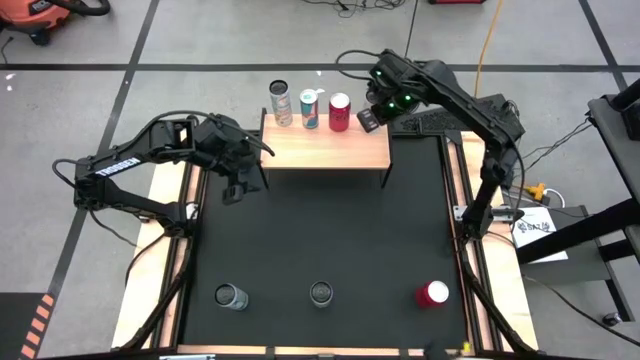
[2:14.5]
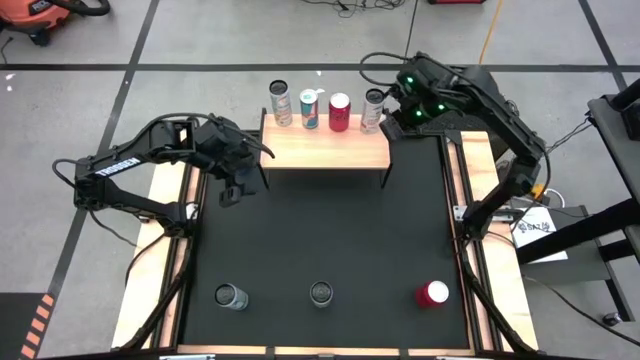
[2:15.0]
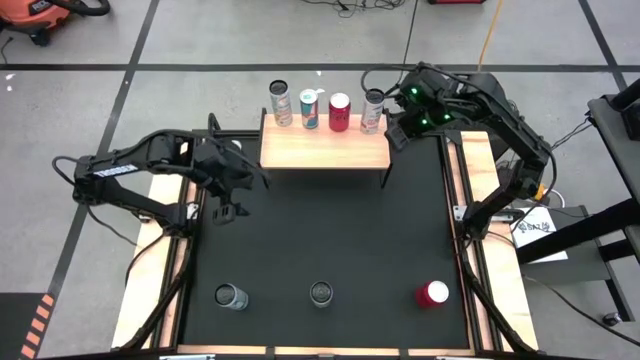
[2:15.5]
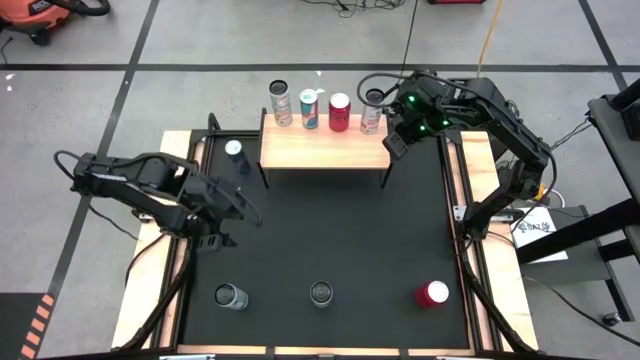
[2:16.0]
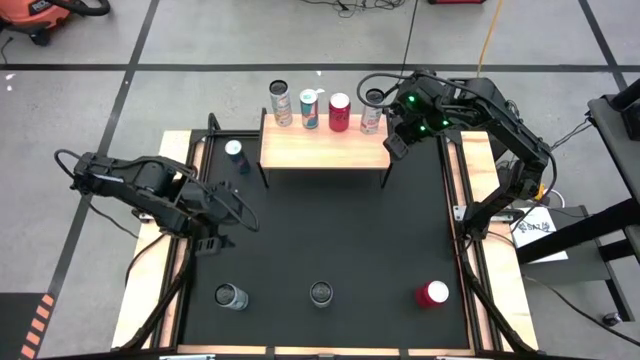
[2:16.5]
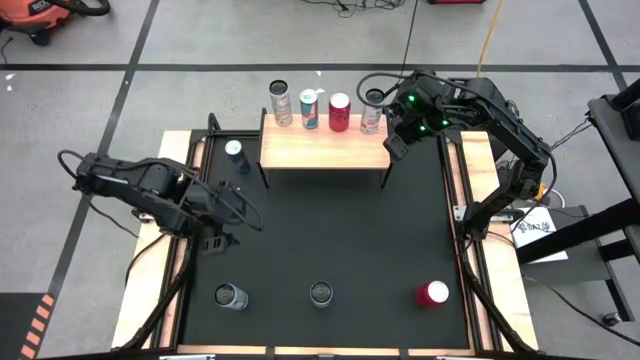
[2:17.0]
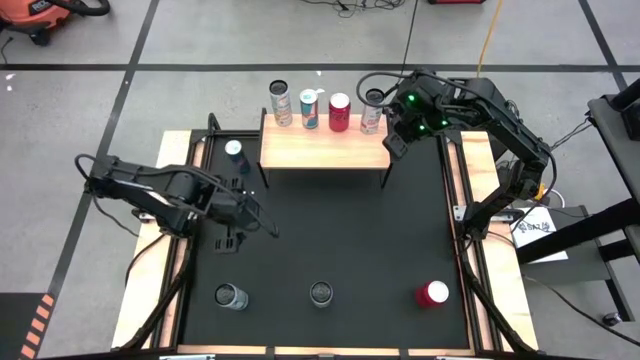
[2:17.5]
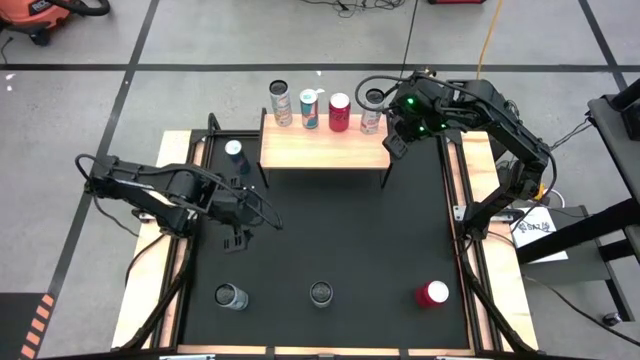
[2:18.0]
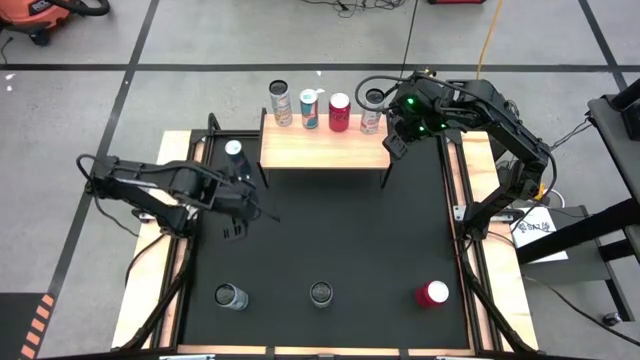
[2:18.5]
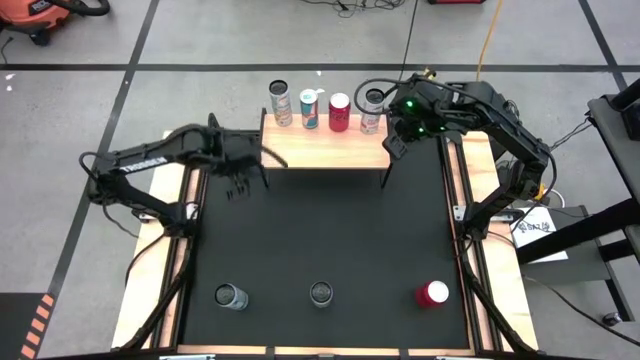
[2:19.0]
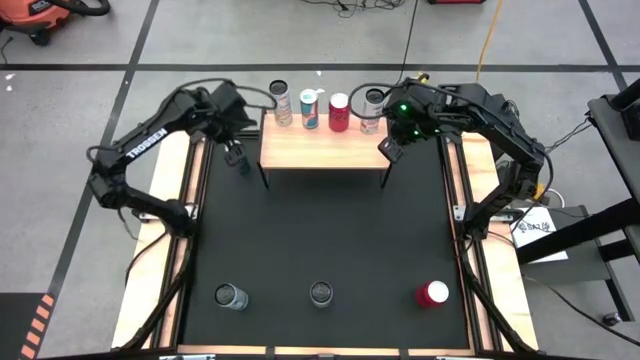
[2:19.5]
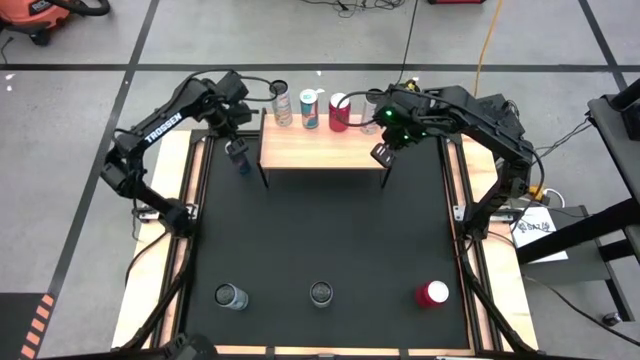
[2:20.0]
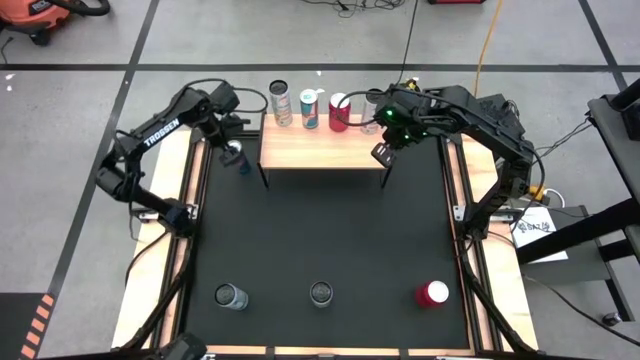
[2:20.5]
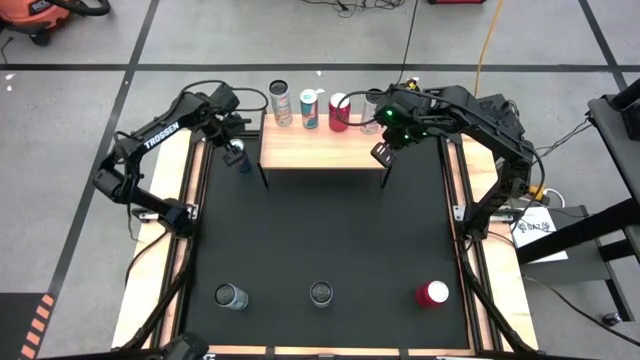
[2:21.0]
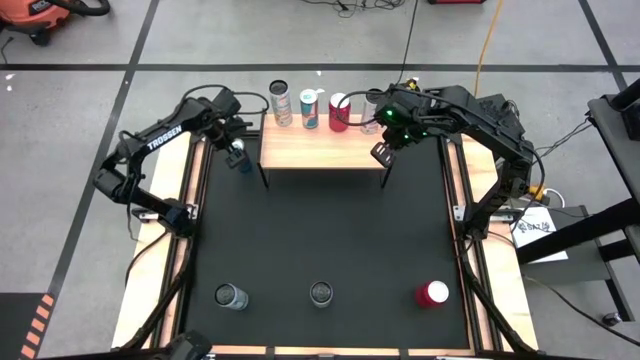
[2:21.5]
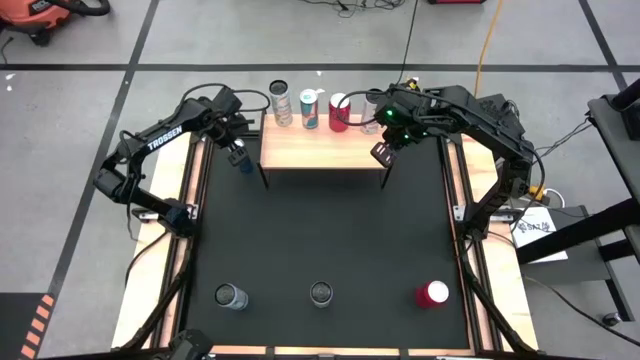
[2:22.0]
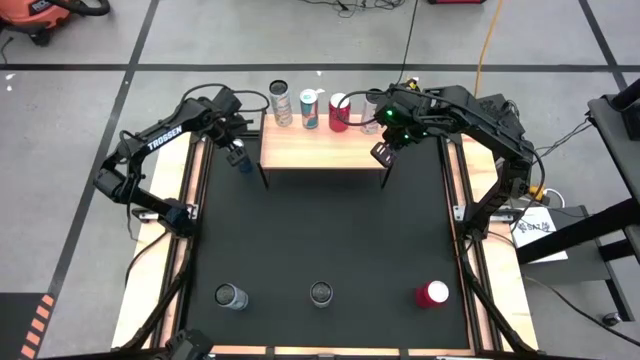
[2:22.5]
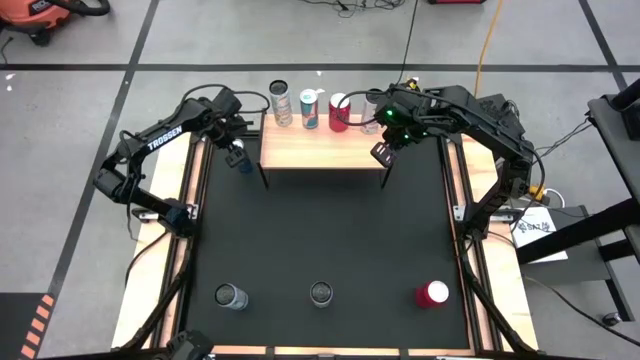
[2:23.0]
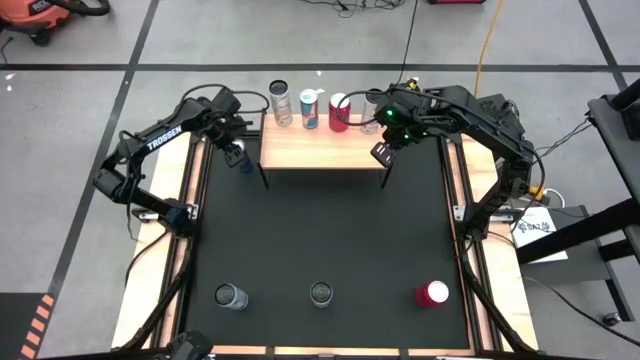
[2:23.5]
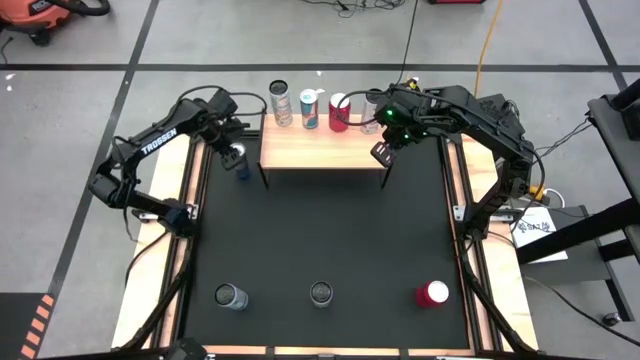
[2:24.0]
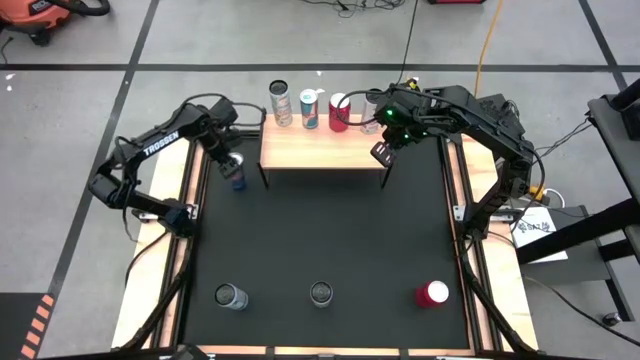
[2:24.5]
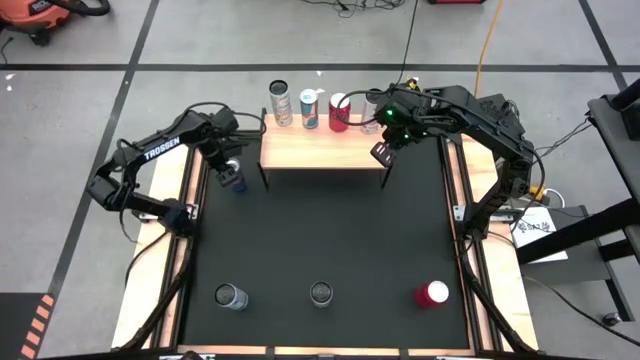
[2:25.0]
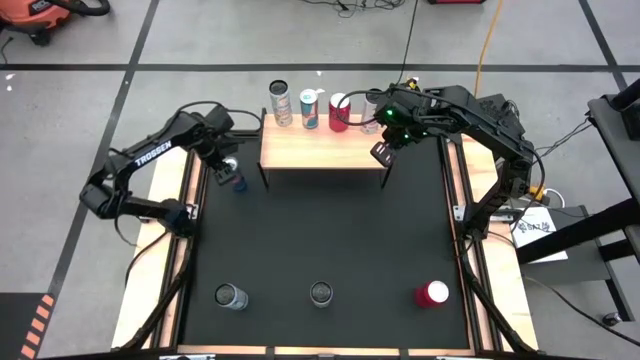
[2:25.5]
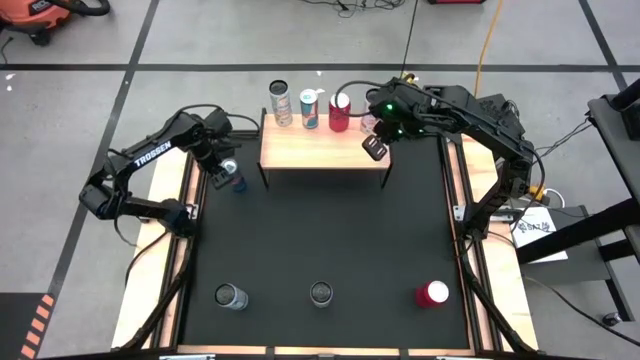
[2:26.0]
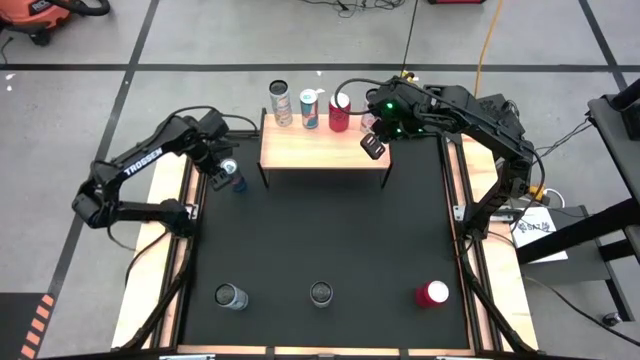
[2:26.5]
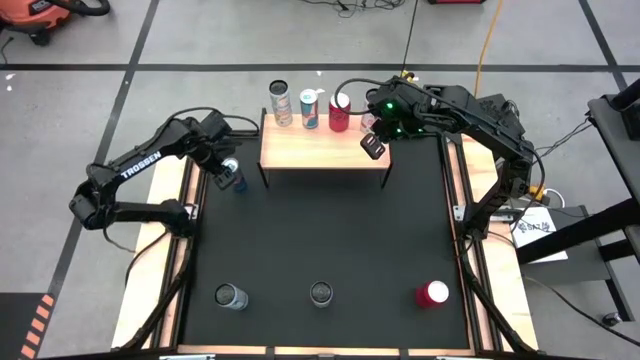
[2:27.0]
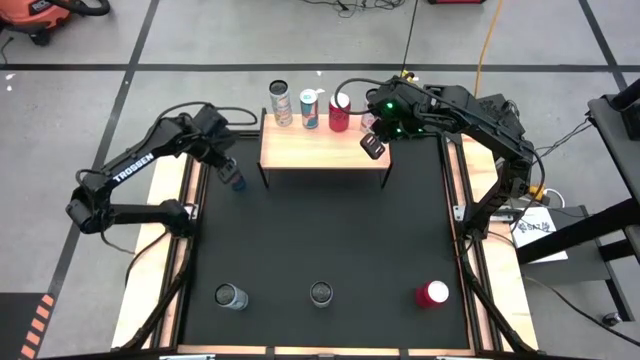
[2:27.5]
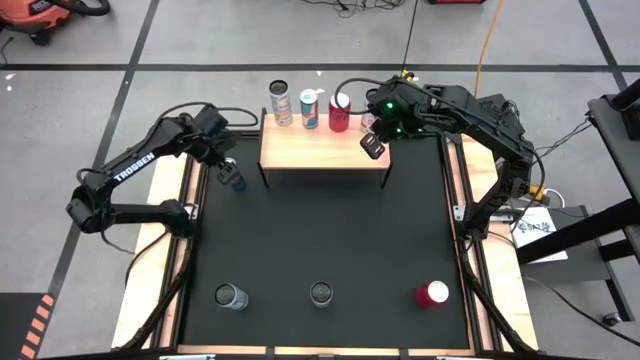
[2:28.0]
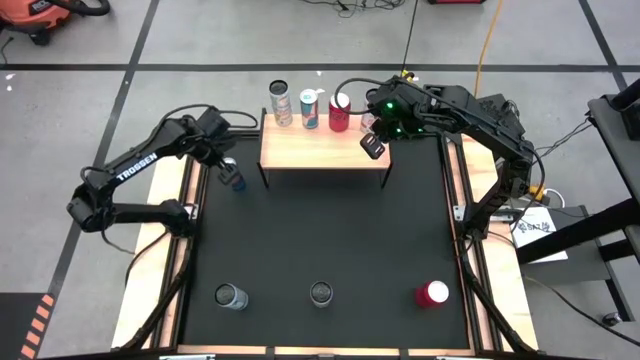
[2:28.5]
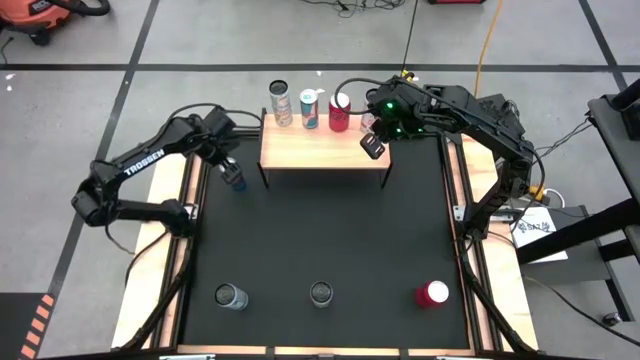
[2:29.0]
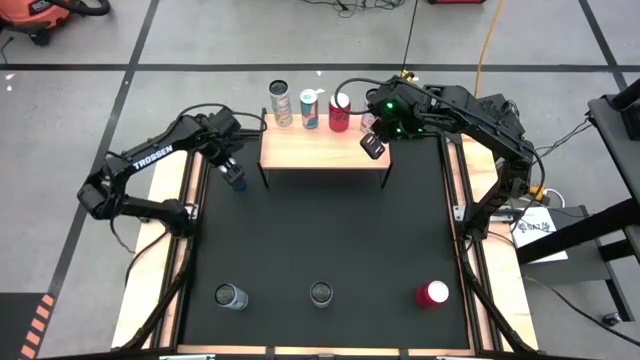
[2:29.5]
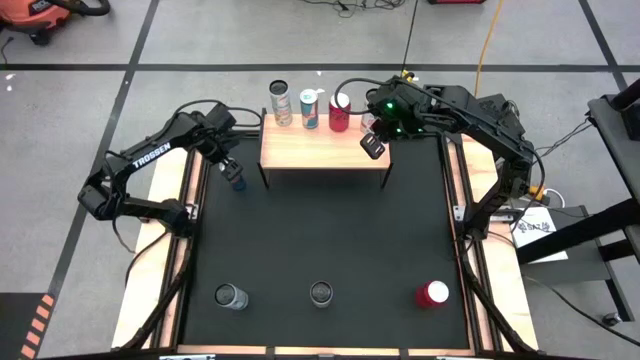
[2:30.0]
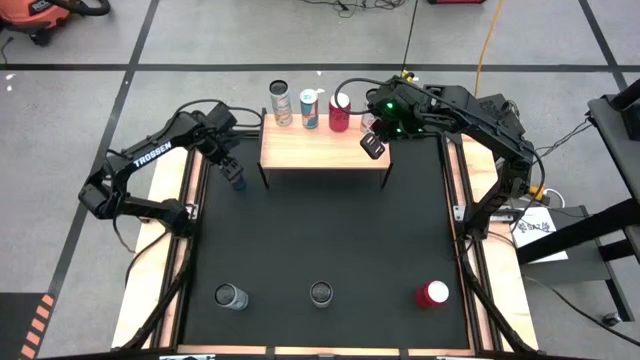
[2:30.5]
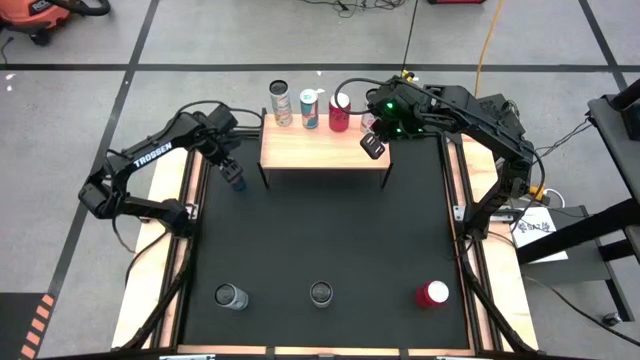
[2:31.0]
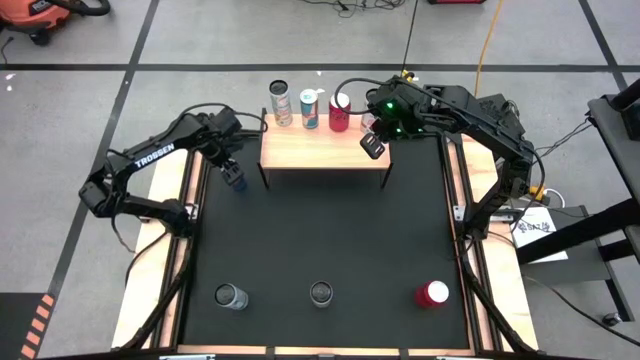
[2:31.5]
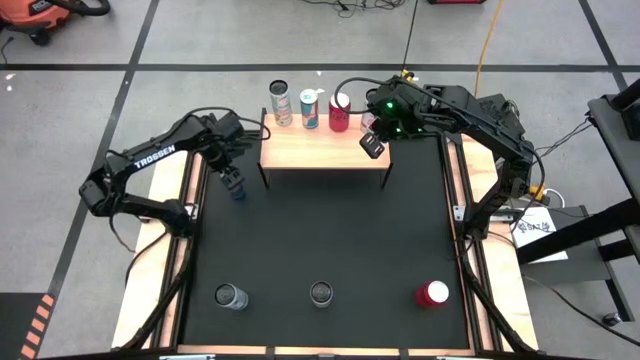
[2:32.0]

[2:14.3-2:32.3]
Task: Place canned beverage on shelf
Put the blue soda can on the shelf

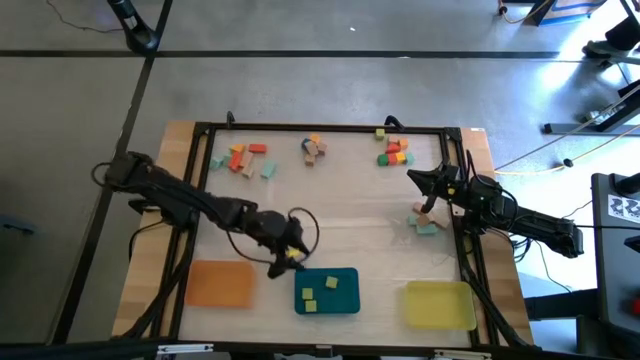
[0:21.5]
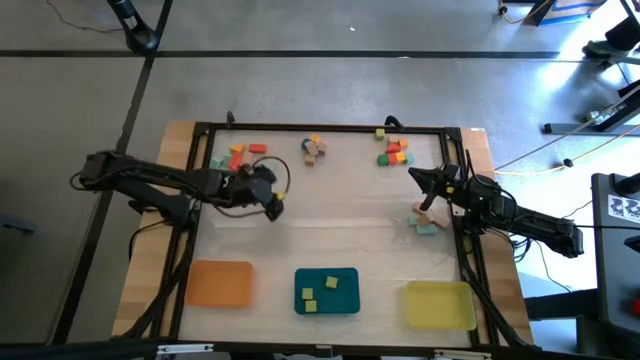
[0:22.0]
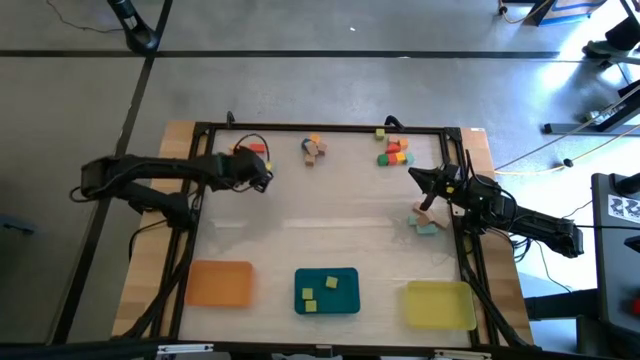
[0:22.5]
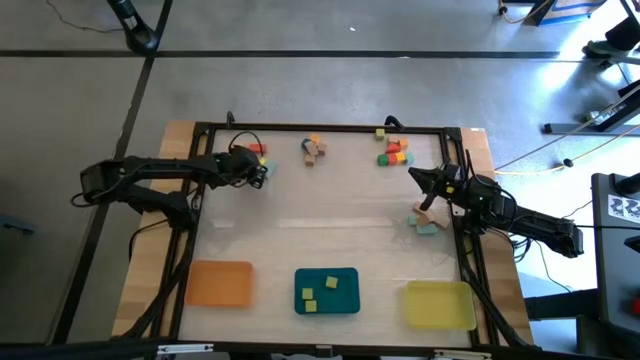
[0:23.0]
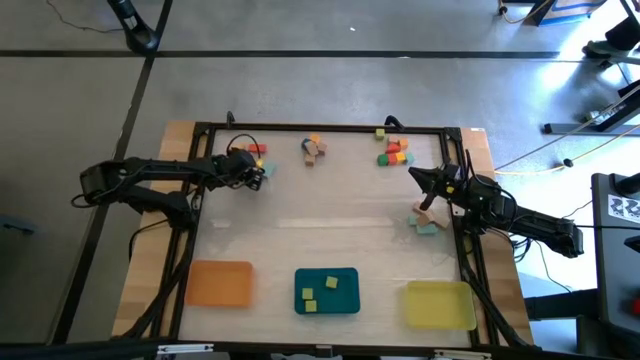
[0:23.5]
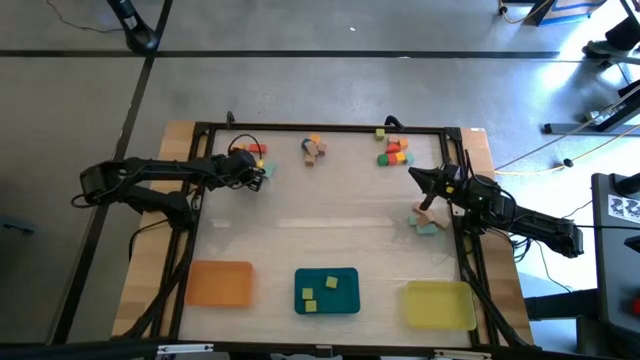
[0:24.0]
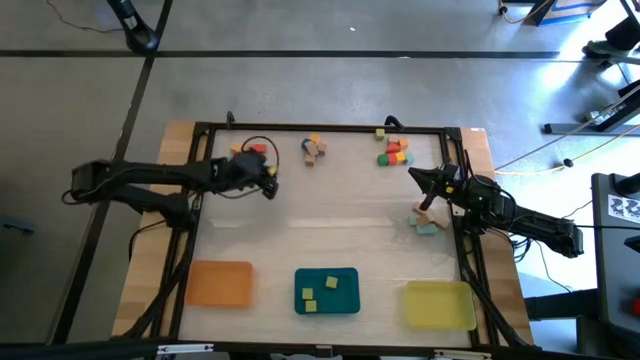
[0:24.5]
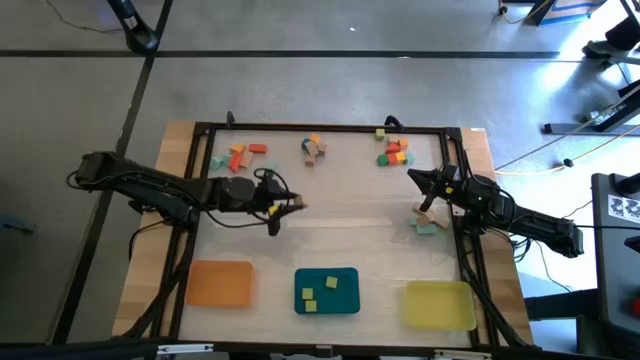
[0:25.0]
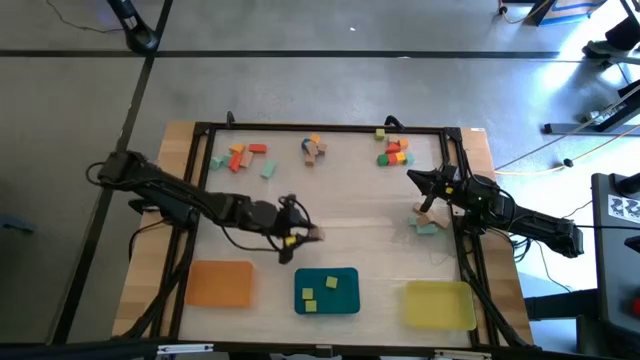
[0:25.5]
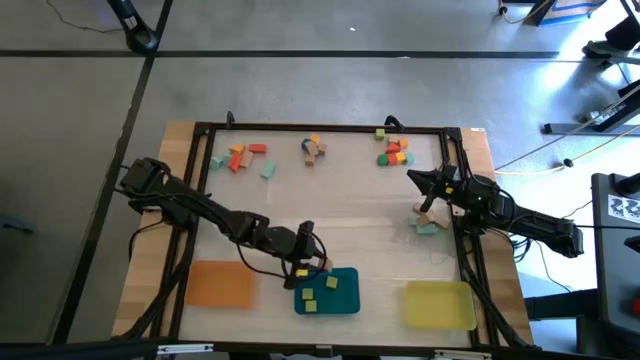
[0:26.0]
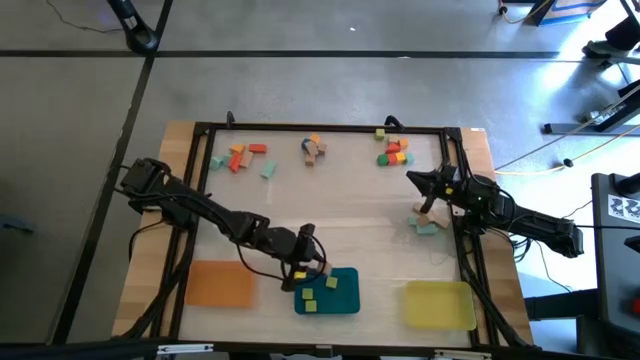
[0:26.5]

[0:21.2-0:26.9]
Task: Sort blocks by size
Put the brown cube block into the blue bin
